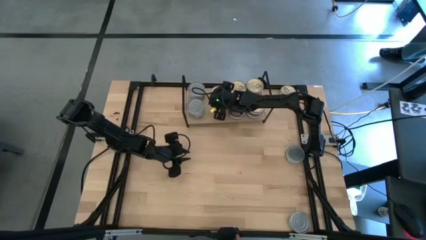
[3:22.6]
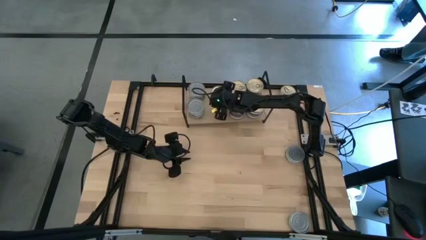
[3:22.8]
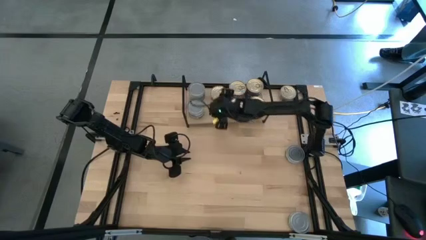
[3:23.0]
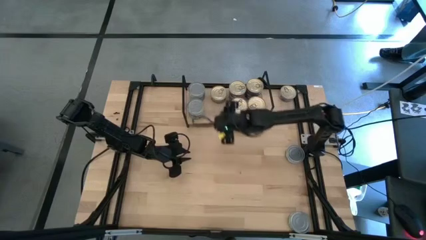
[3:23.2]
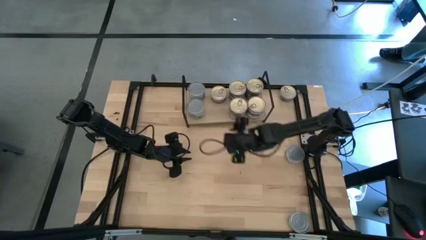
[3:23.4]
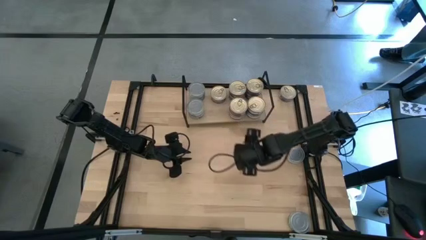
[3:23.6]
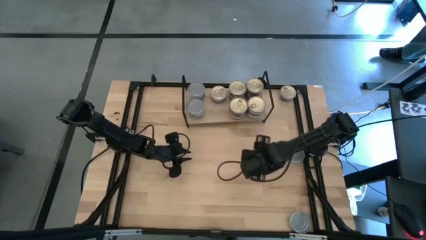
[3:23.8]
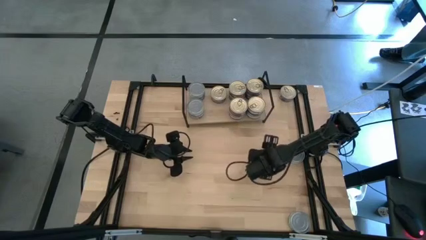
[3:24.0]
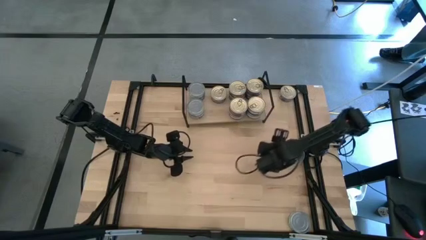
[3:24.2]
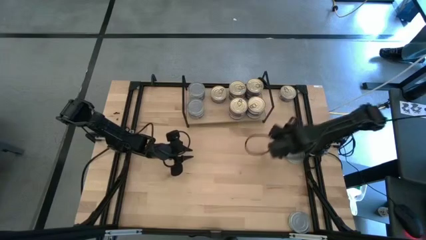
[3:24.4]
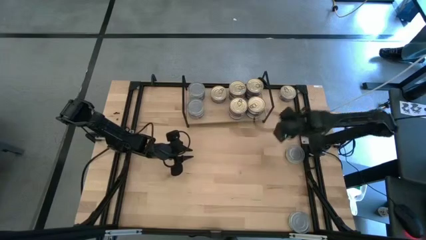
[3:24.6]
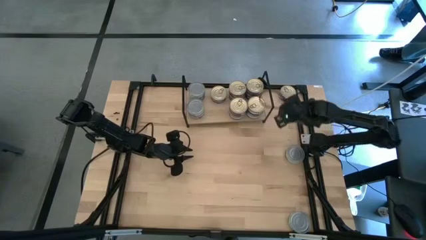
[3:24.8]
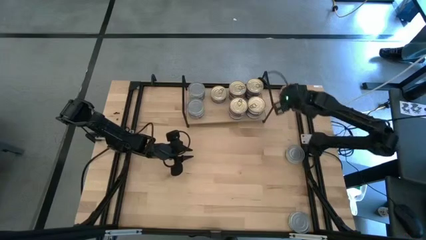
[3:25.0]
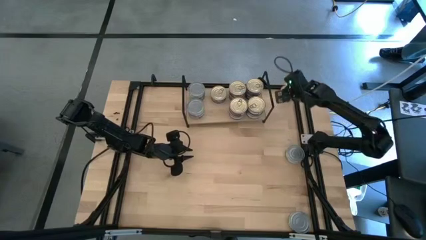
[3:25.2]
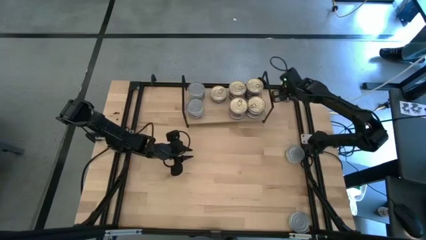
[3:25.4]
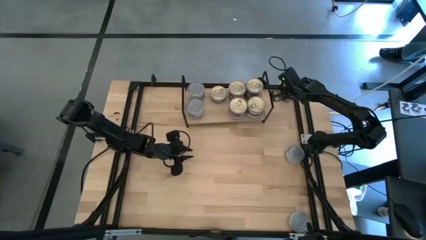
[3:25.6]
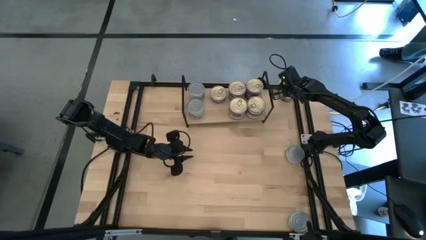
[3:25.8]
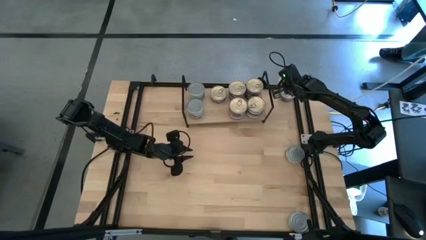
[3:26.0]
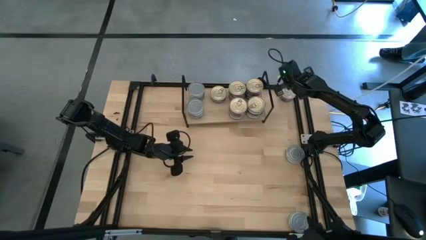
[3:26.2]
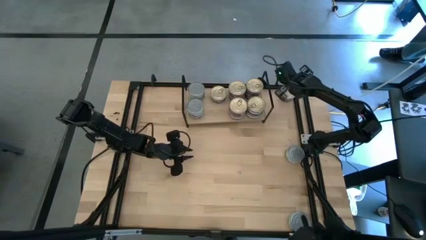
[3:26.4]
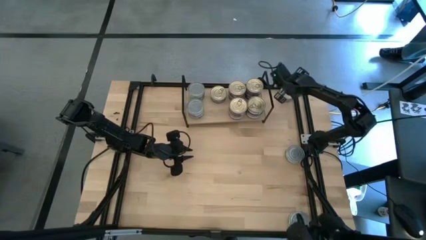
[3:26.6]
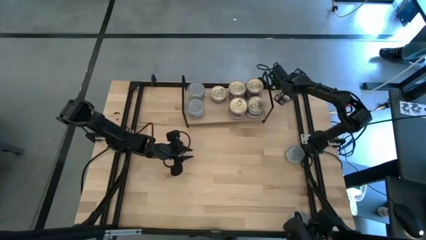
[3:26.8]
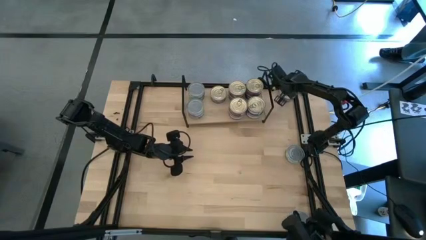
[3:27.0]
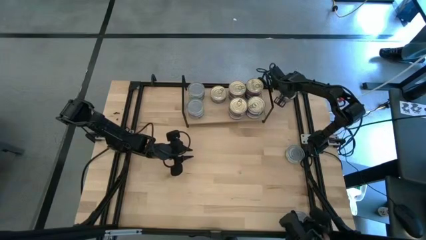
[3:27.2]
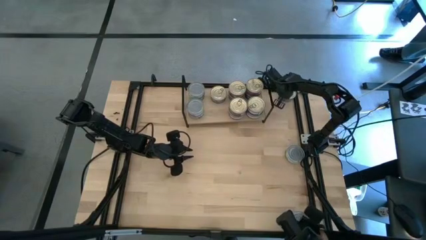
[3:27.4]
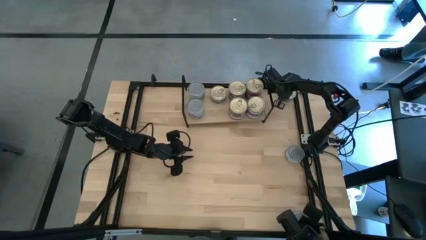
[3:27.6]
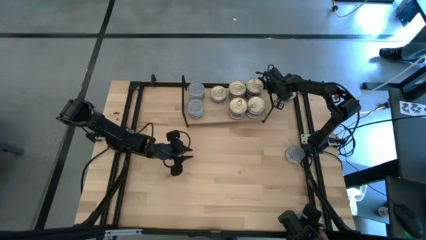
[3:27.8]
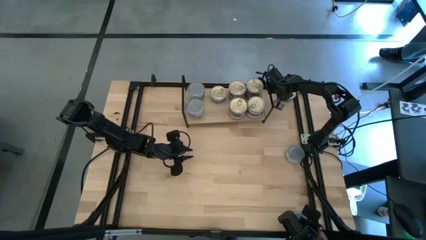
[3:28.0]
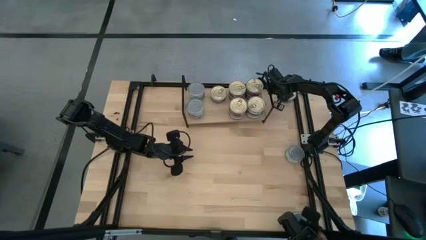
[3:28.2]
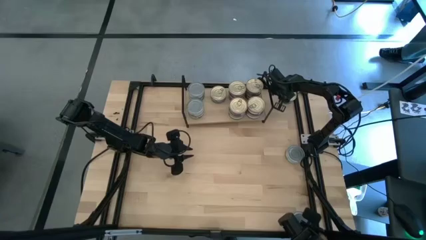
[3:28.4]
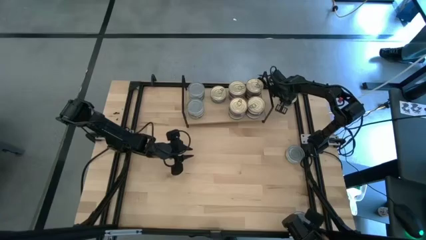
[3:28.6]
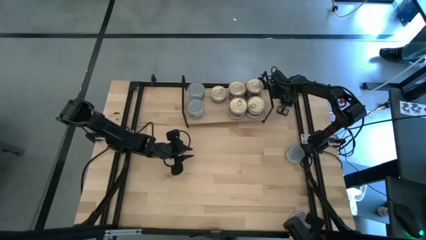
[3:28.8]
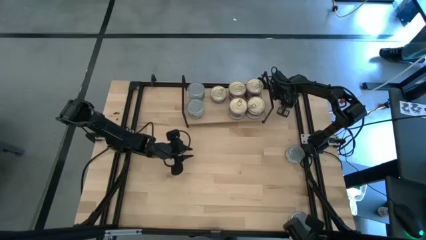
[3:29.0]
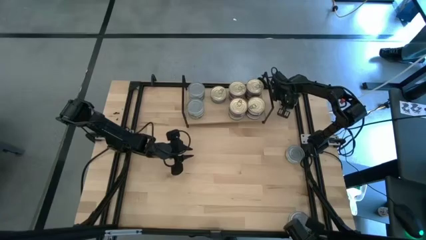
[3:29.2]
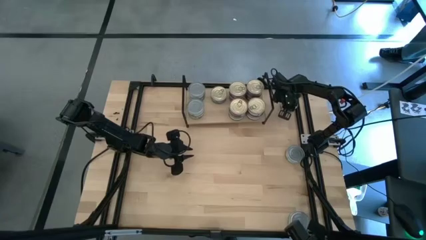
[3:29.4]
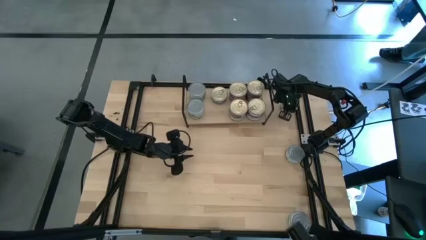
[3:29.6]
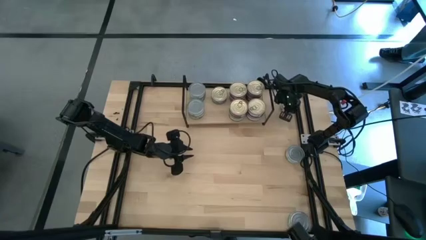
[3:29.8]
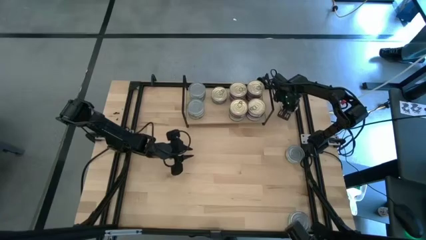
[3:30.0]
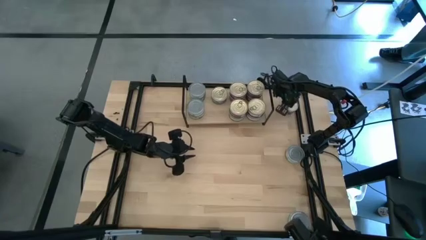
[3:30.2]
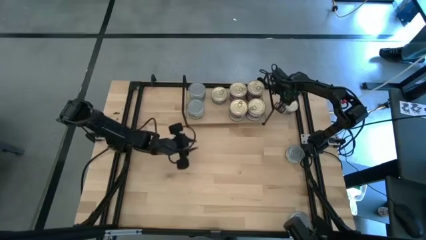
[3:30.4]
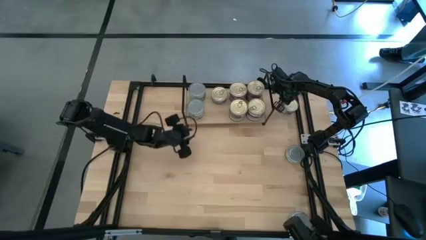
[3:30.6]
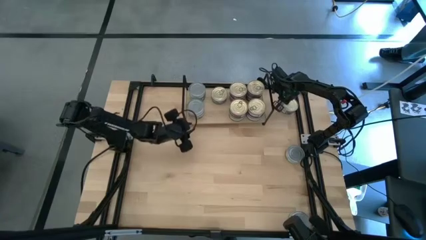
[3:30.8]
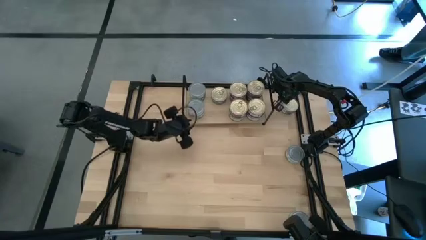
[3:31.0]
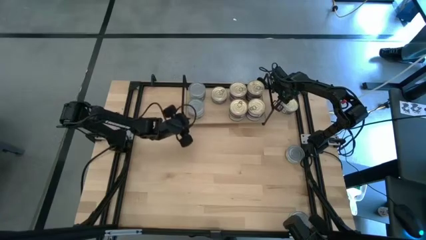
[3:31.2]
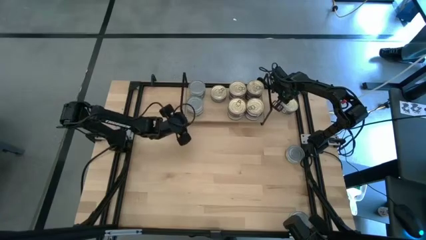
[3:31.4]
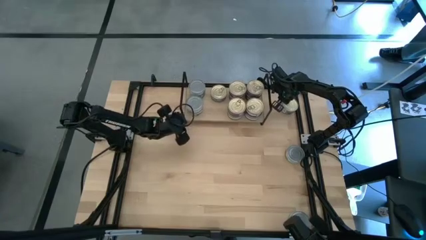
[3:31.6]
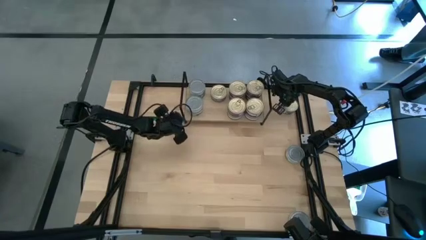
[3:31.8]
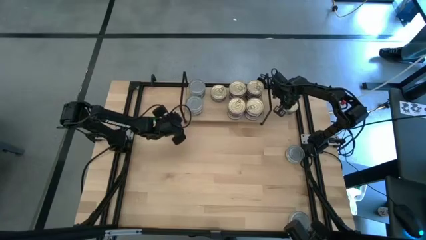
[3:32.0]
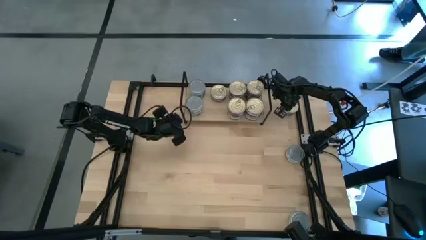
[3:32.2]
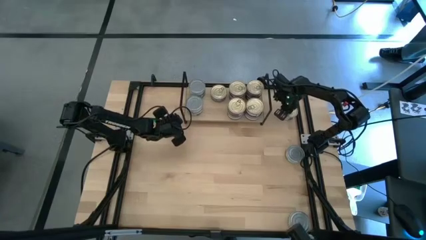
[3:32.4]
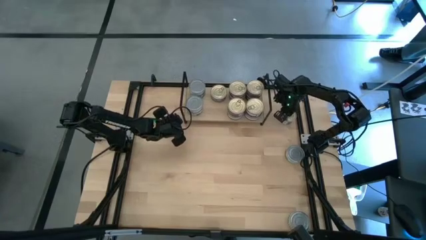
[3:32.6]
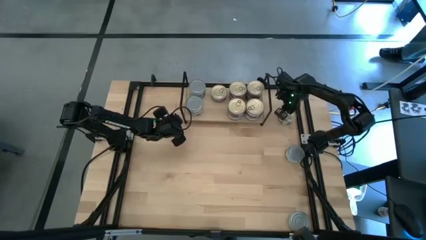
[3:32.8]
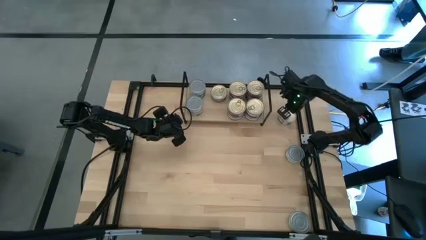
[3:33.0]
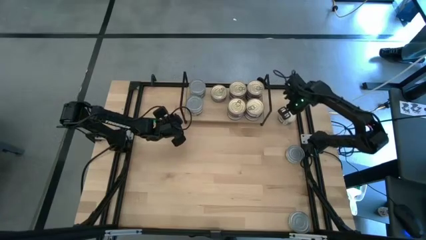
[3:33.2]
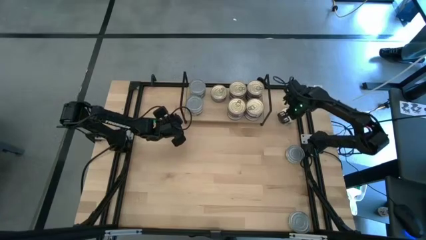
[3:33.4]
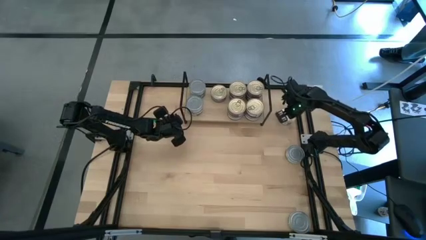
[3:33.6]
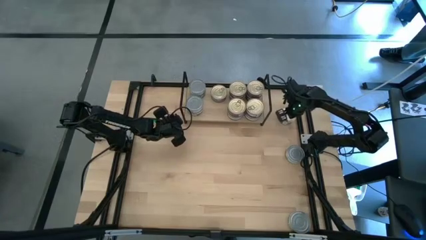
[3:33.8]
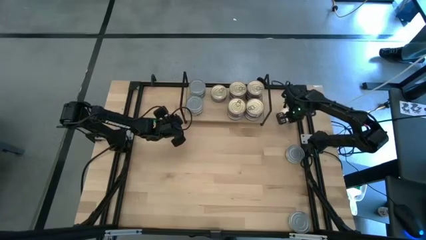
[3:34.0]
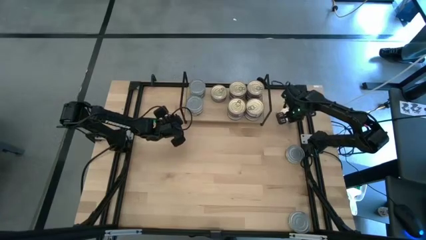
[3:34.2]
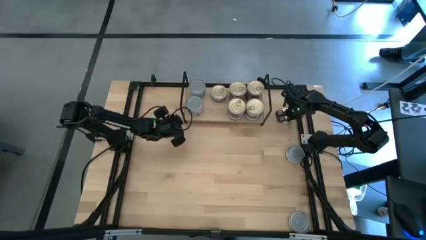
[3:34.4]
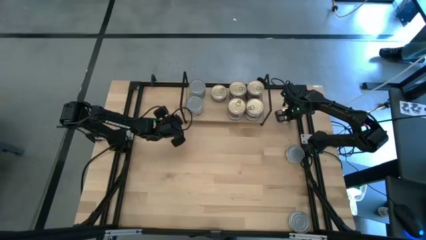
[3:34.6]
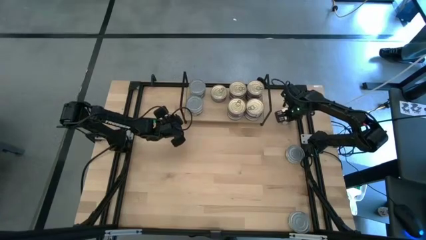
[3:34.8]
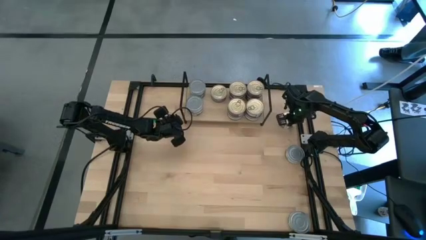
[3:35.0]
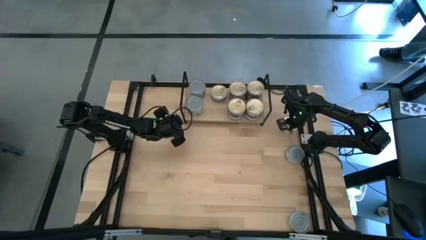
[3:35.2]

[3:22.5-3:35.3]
Task: Stack canned seafood by type on shelf
Stack the blue pink tuna can on top of the other blue pink tuna can on the shelf

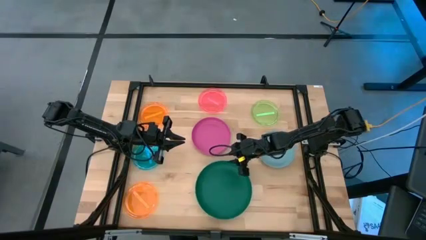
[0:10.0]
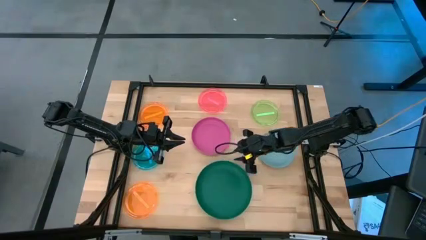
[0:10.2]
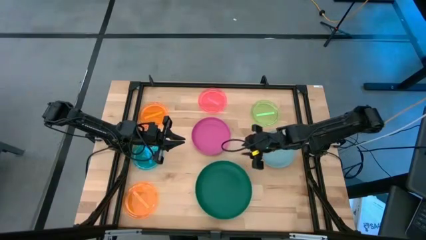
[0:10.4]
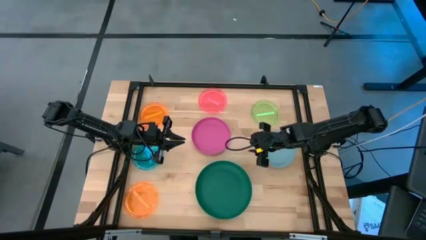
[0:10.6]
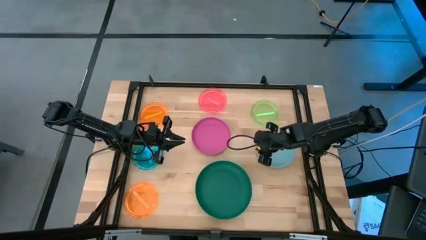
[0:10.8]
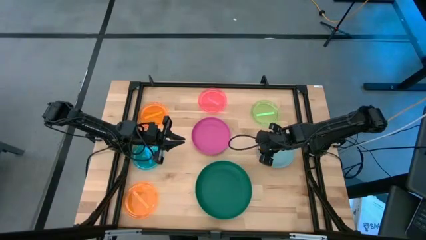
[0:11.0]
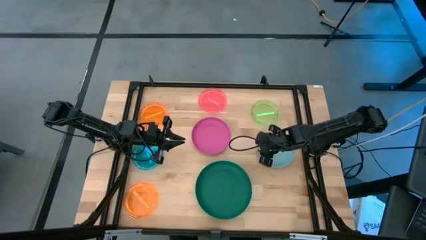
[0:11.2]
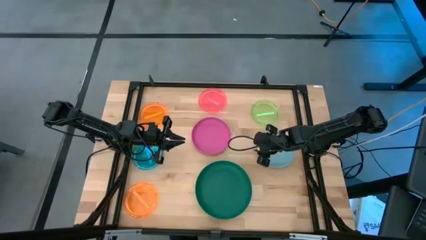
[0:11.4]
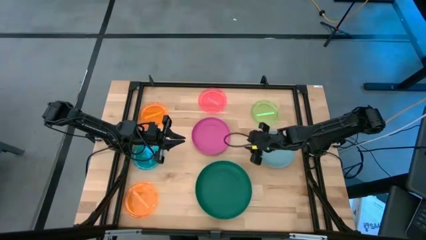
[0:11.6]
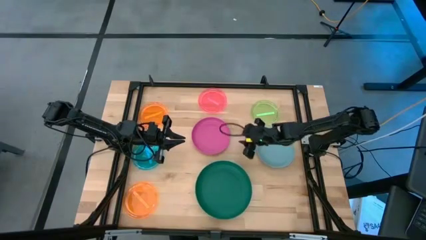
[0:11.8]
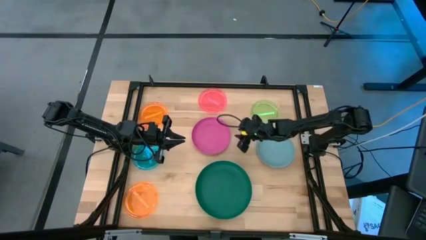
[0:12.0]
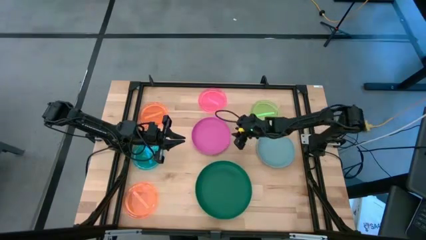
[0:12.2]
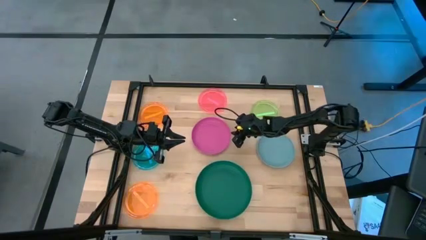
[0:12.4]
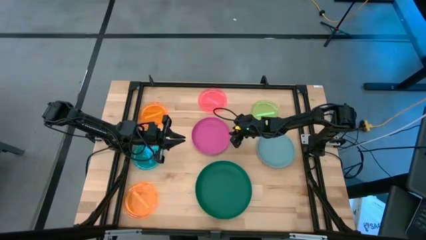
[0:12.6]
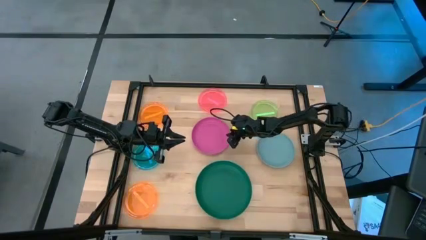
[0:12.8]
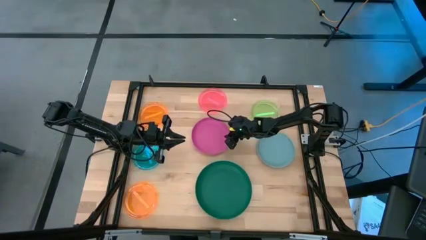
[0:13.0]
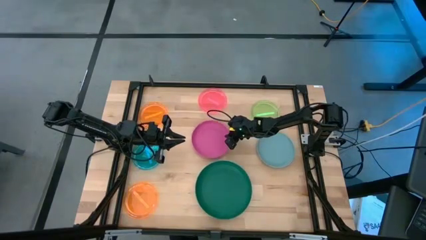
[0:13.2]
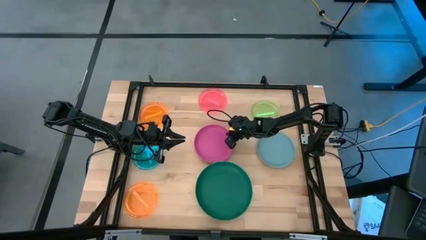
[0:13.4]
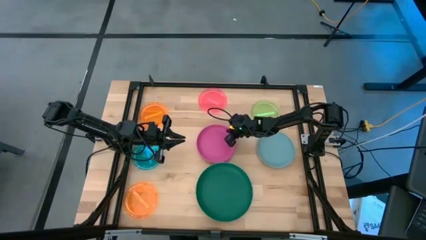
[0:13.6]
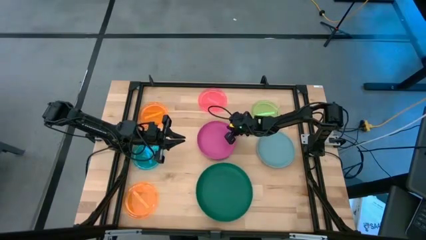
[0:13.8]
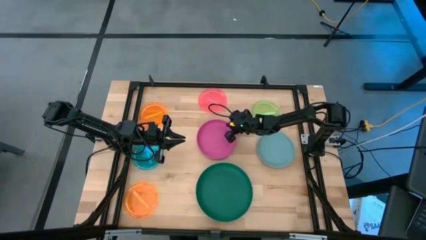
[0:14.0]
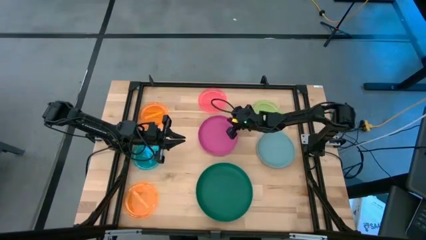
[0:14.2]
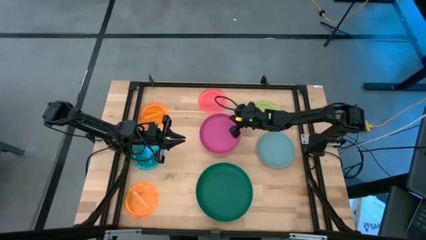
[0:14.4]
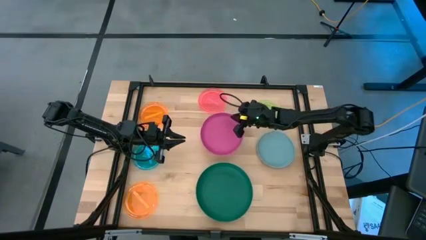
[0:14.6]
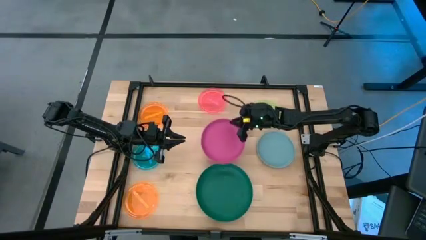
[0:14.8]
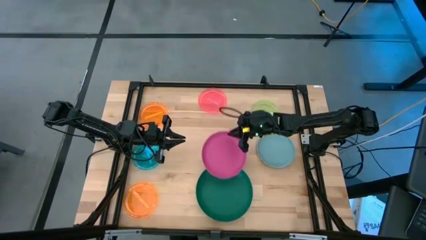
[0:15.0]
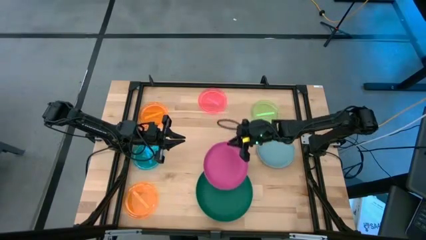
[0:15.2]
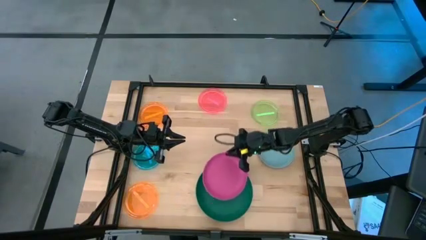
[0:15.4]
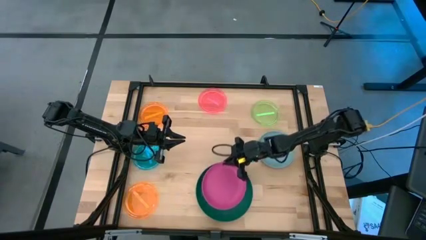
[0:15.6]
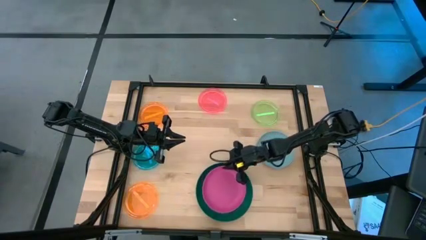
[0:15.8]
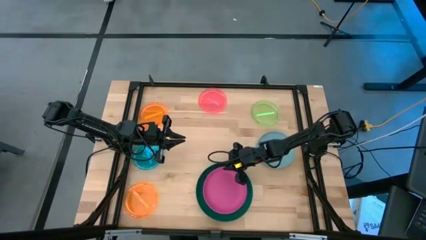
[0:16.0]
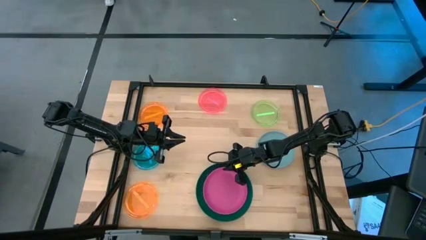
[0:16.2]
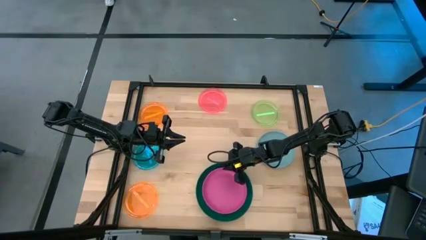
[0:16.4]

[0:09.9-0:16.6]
Task: Stack plastic plates
Stack the pink plate on top of the dark green plate
